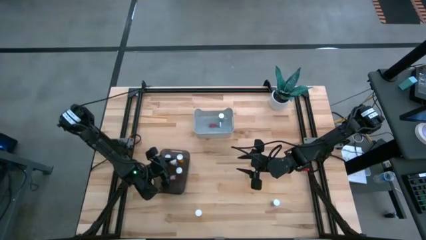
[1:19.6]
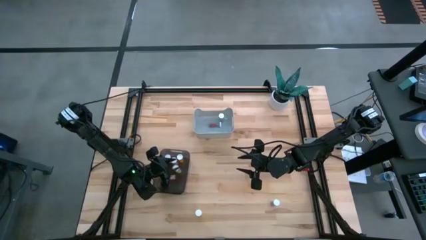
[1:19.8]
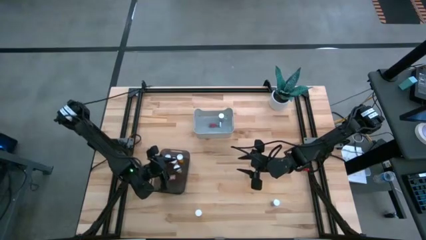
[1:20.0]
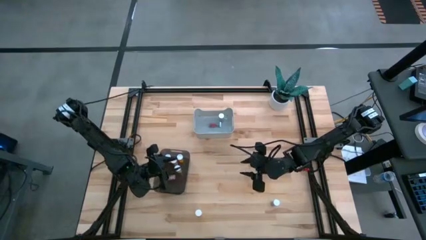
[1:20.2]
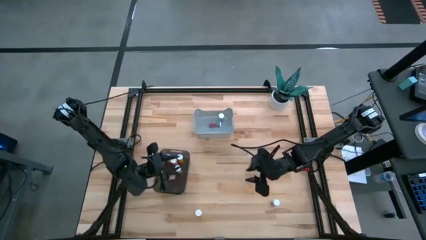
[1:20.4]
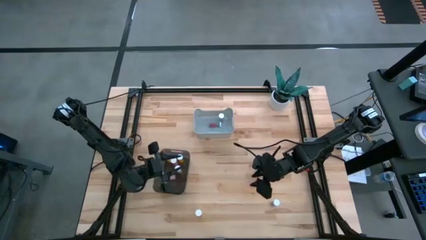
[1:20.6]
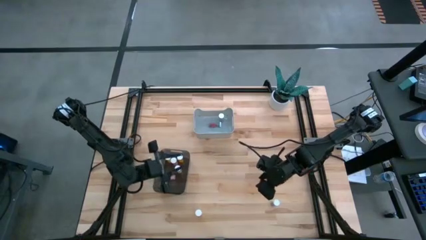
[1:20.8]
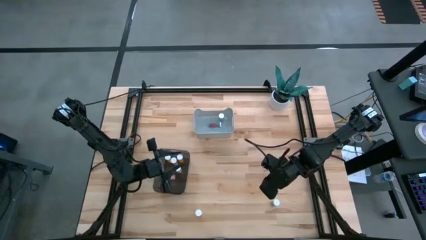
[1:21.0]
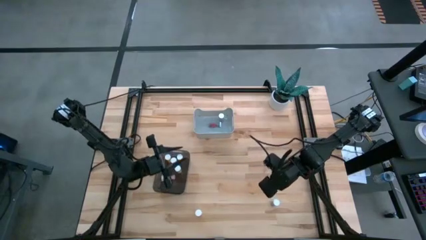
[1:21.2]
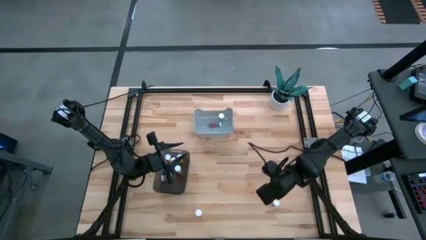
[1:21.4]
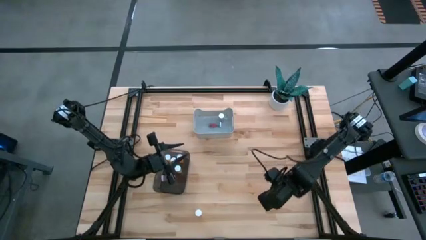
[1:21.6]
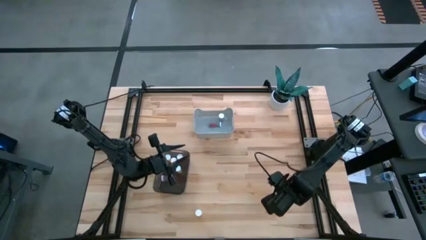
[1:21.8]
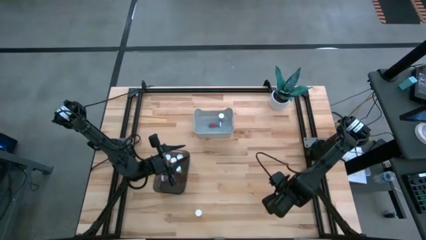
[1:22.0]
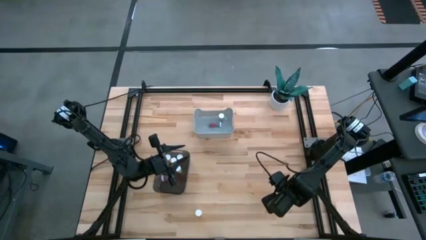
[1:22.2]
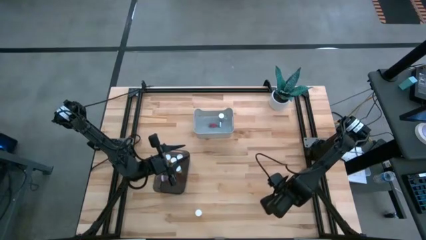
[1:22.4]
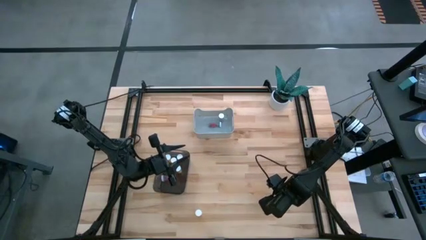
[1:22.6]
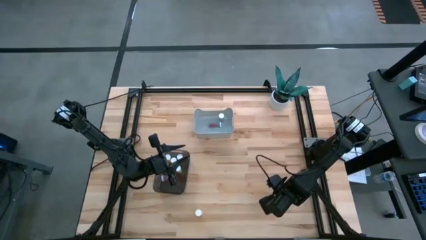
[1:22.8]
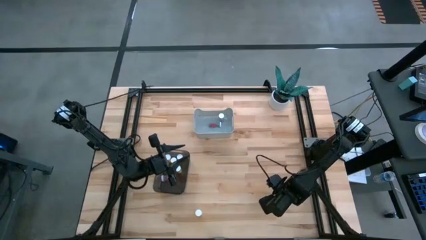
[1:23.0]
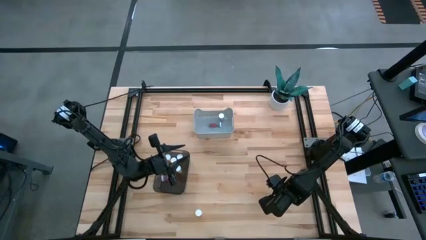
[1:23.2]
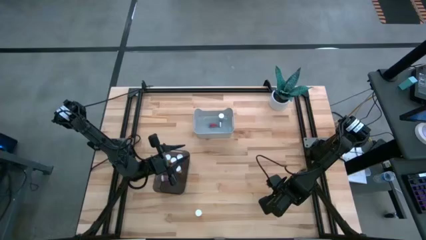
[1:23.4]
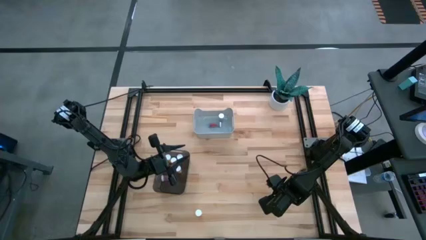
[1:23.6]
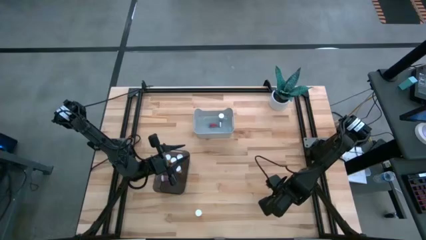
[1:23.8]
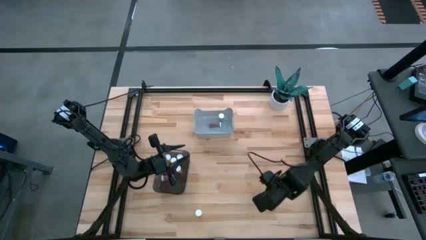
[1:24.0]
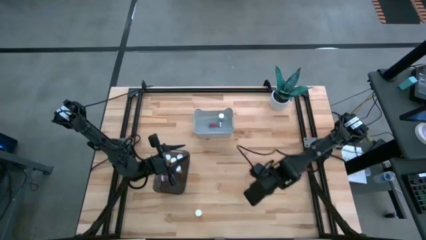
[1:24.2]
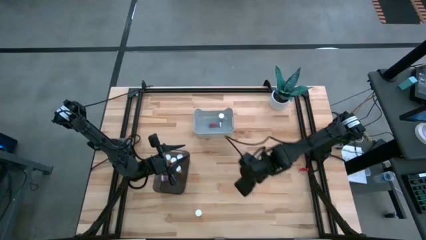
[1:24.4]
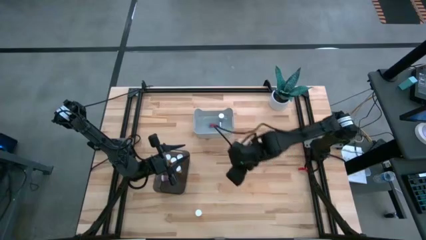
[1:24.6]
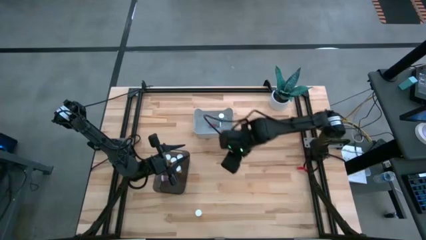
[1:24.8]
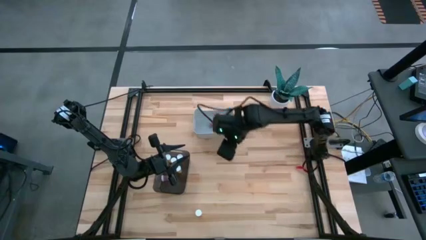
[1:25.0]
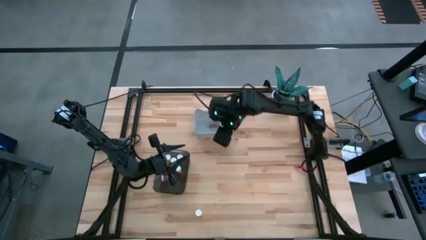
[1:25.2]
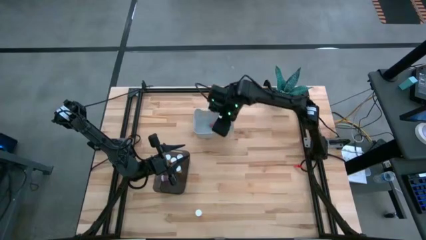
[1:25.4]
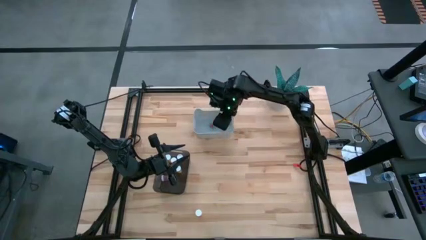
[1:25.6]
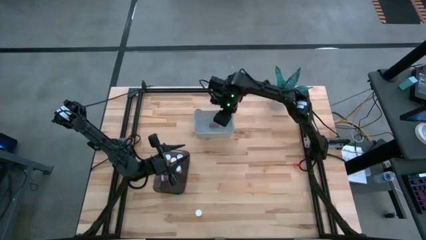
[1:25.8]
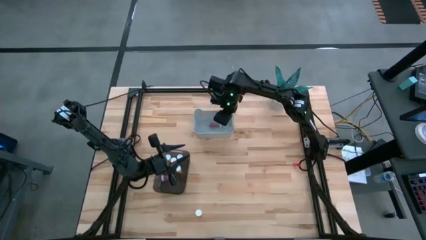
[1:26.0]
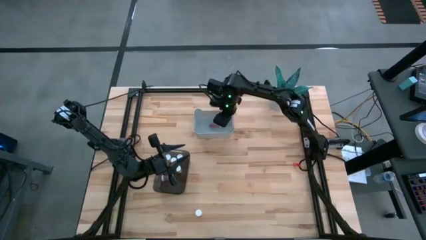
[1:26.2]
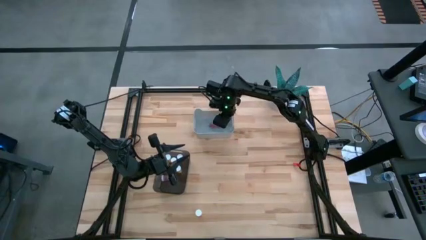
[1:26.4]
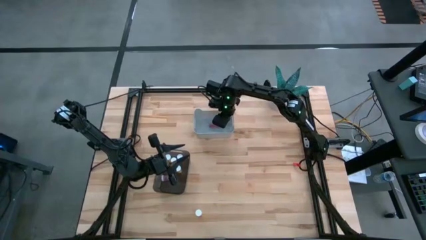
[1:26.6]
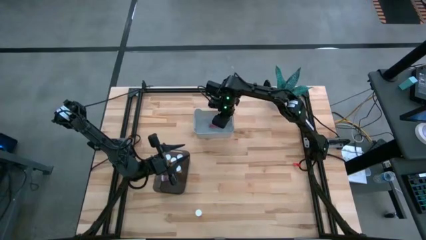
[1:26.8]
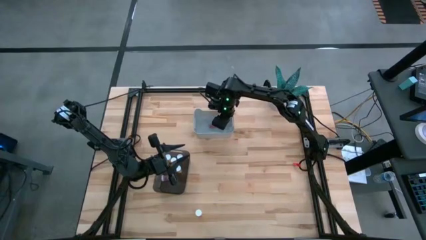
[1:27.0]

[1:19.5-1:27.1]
Task: Pick and place medicine bottles into bin by pill shape (circle, oval)
Put the blue capsule bottle into the gray bin

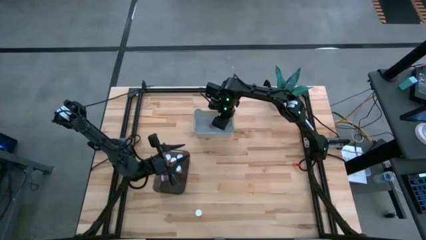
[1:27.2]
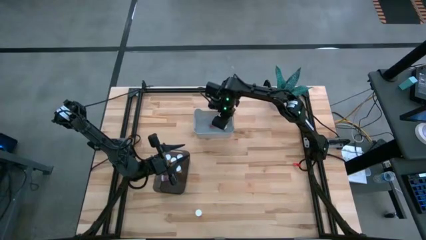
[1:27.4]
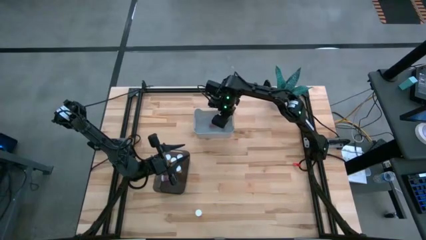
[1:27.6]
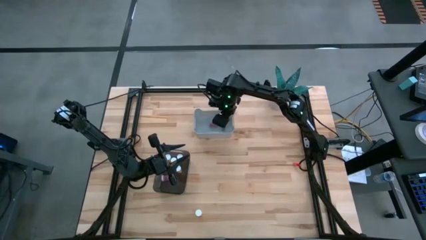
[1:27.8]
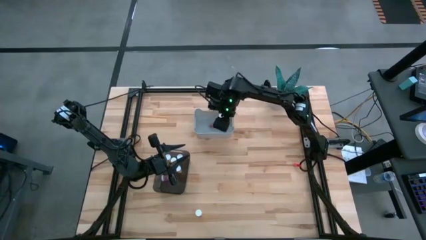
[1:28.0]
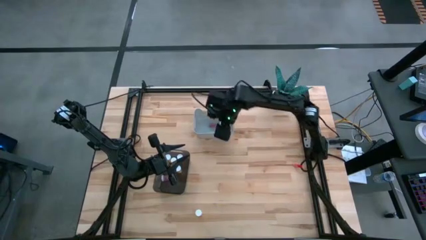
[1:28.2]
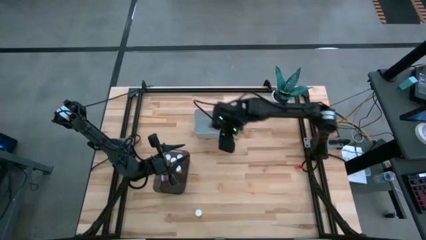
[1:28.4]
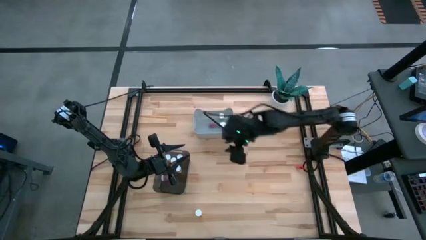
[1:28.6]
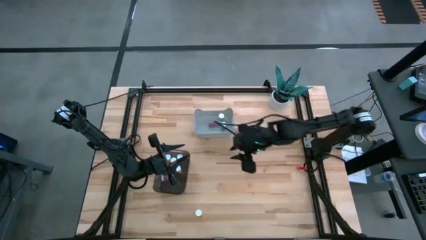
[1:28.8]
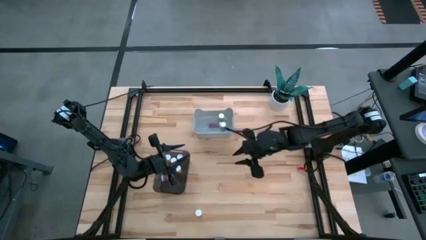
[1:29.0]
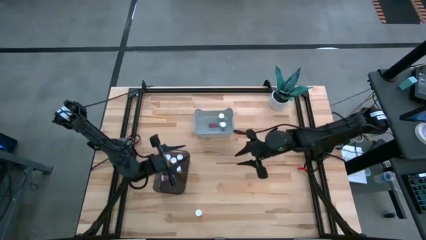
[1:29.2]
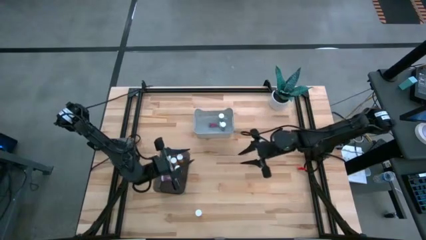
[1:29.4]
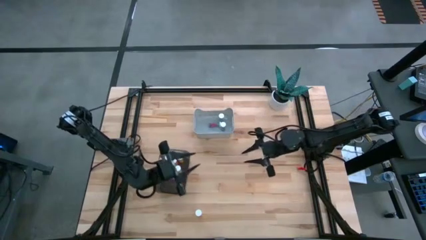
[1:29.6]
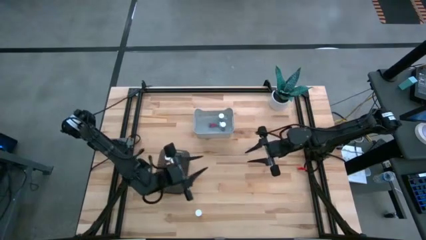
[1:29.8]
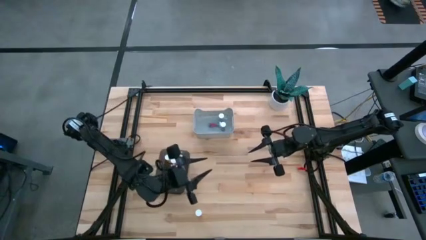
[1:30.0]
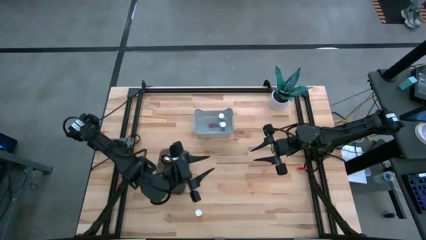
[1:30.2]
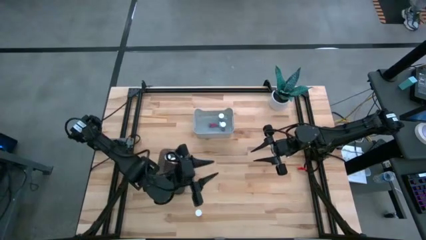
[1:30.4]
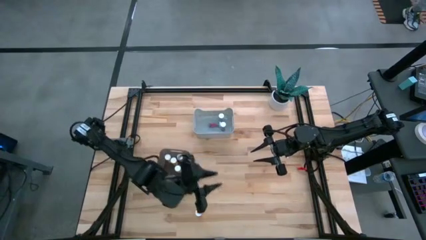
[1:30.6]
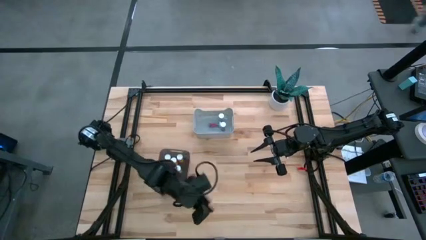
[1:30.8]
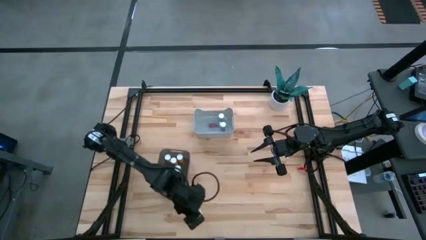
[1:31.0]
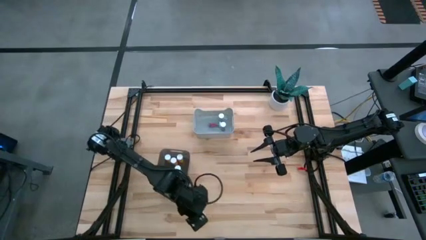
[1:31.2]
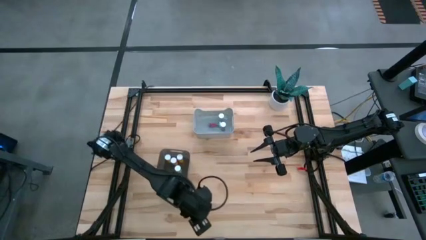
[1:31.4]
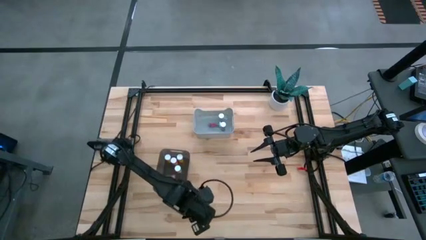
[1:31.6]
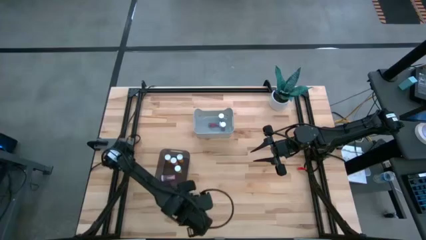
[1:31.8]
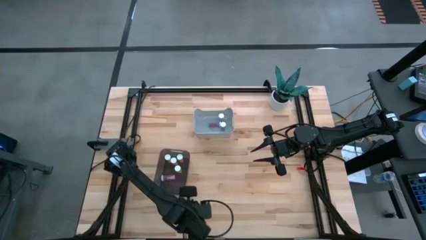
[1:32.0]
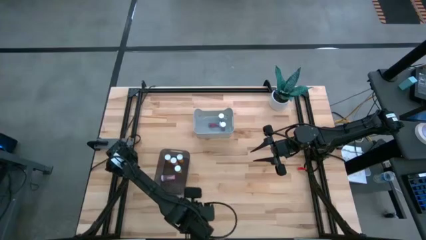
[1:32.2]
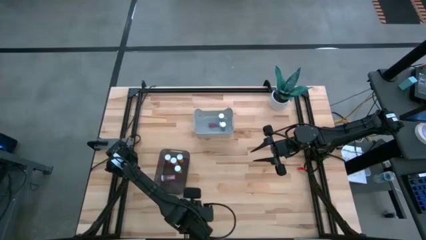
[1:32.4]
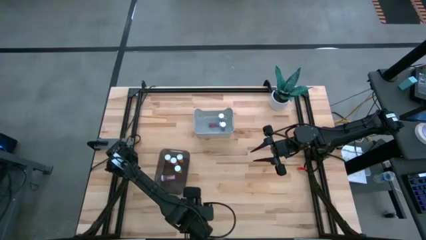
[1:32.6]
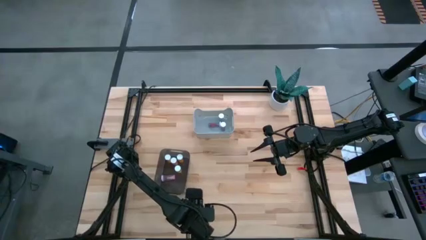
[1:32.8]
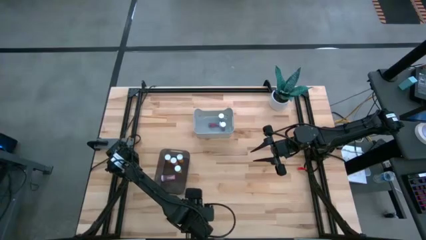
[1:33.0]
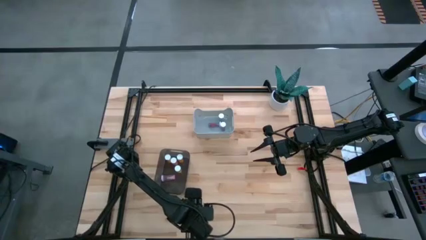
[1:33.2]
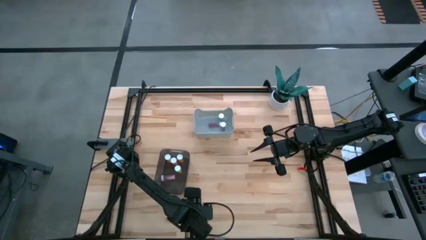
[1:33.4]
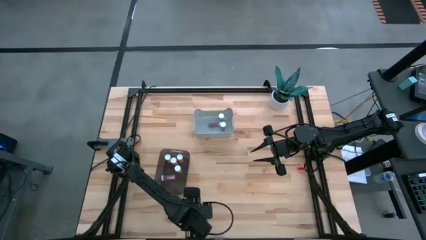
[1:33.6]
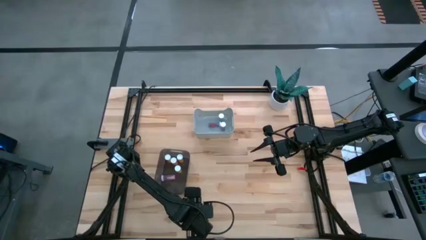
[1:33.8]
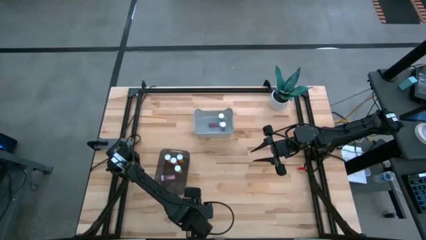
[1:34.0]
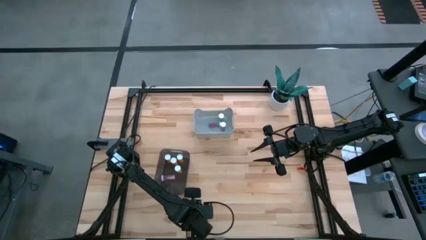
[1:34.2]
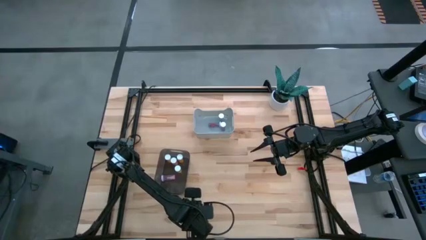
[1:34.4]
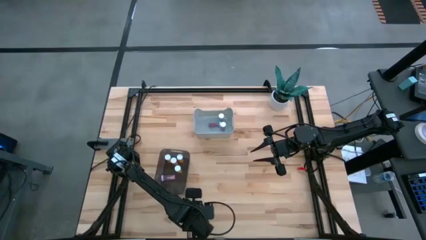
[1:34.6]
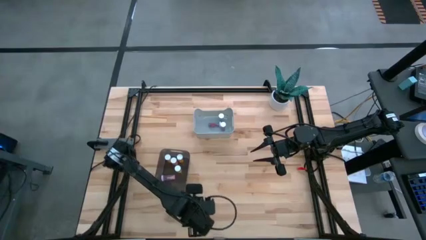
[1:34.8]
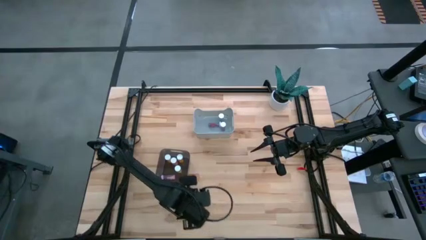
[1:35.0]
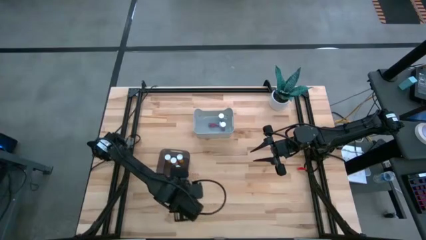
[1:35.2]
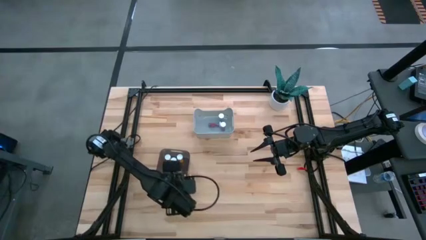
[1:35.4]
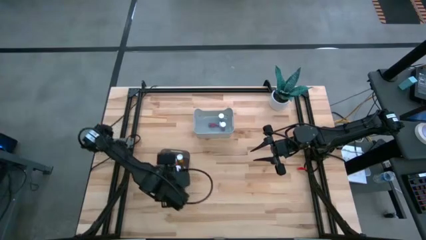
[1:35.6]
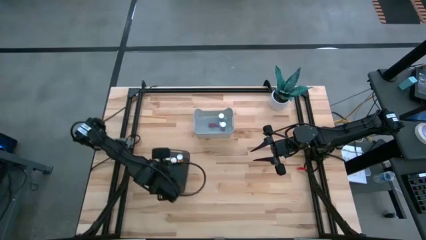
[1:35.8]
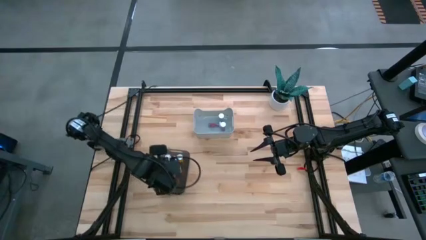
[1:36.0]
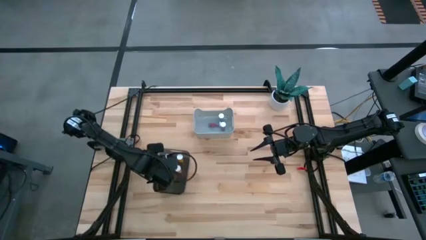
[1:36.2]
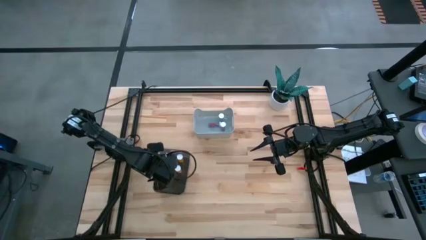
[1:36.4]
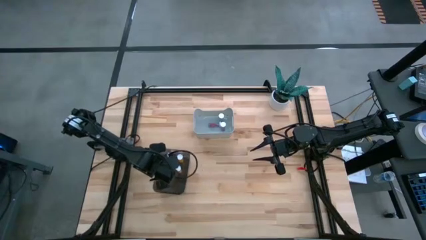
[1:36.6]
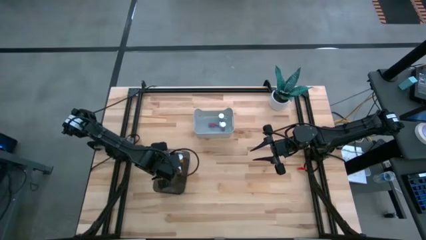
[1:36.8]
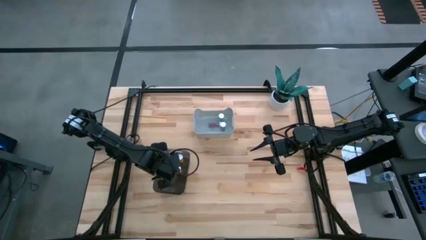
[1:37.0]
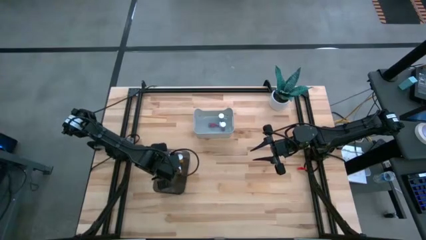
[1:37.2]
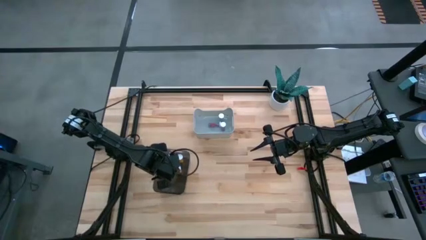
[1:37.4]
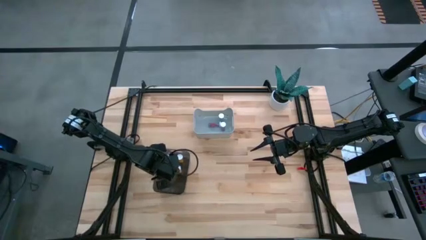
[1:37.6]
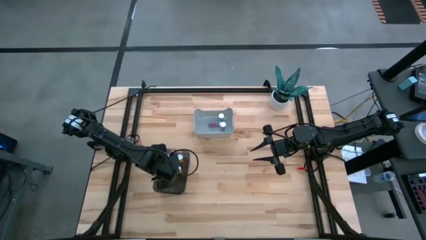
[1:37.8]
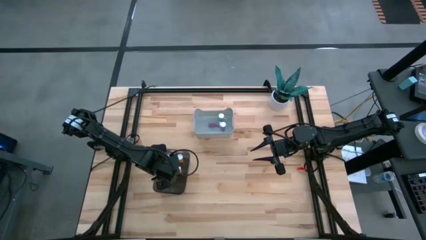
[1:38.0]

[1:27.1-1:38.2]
Put the orange tablet bottle into the black bin
